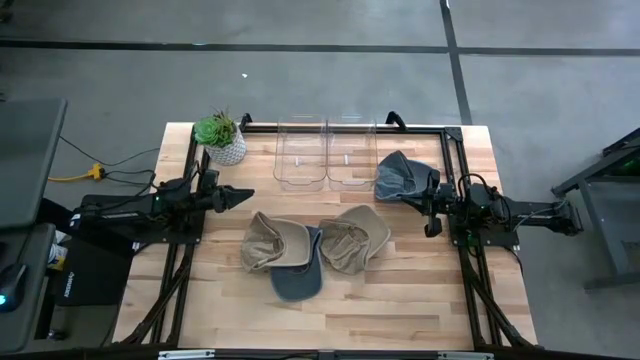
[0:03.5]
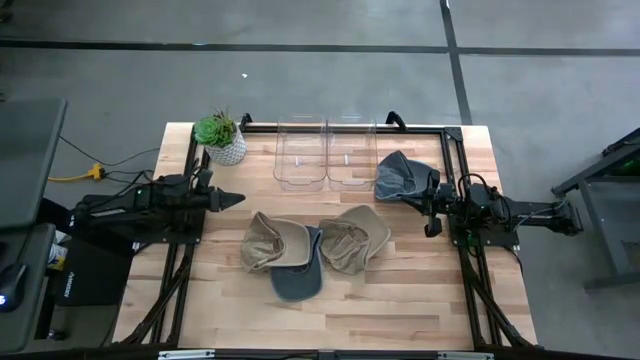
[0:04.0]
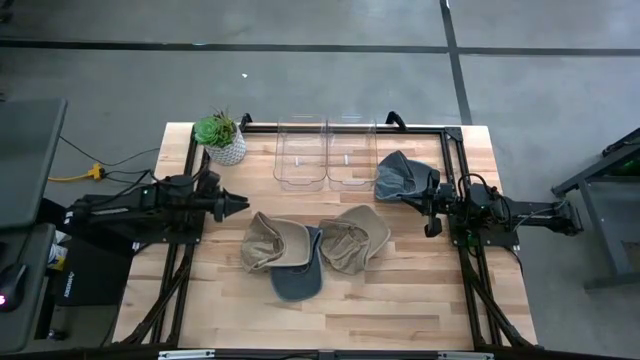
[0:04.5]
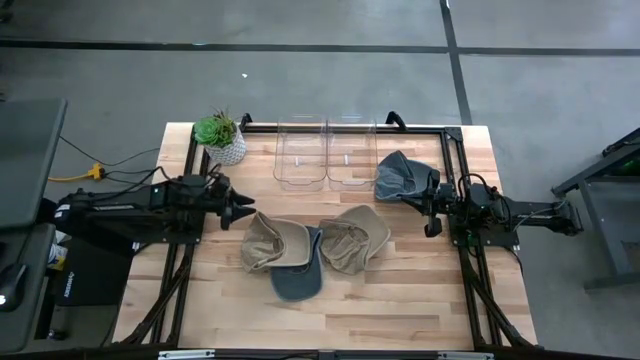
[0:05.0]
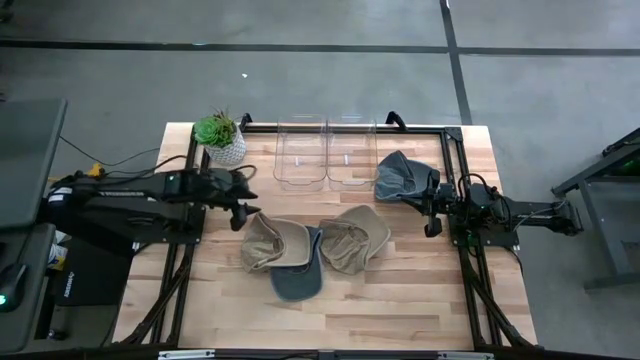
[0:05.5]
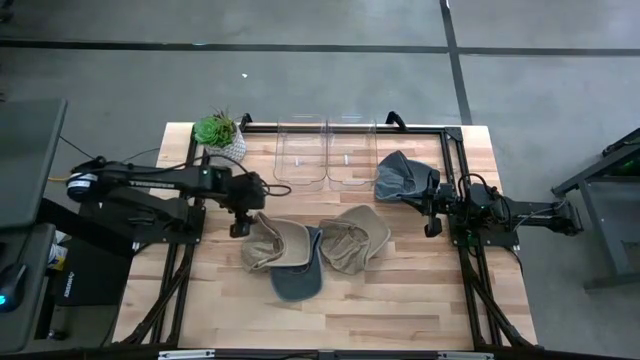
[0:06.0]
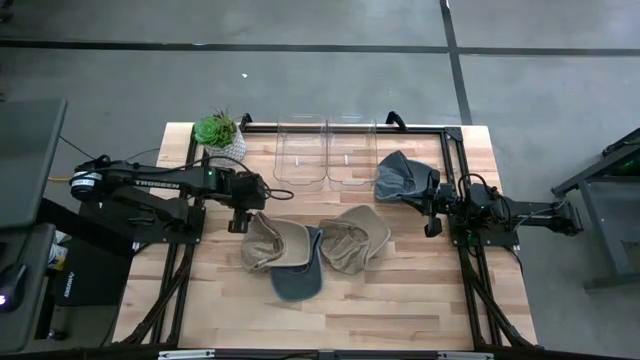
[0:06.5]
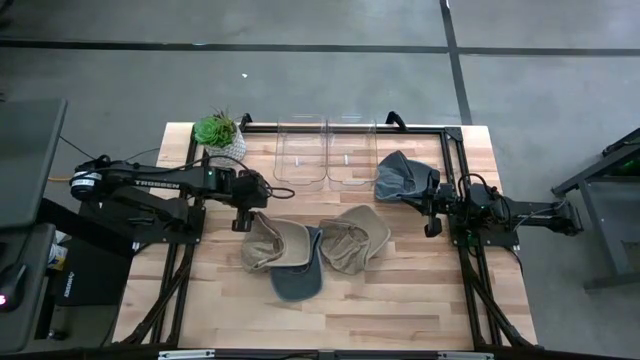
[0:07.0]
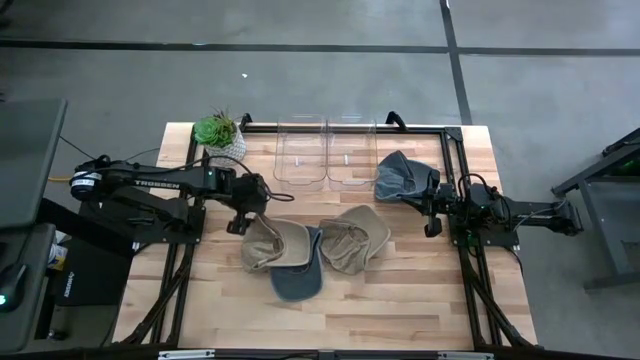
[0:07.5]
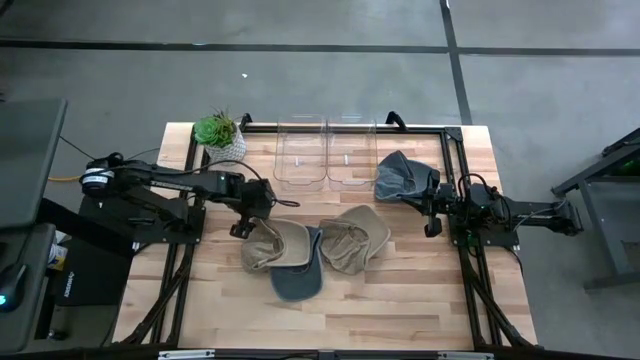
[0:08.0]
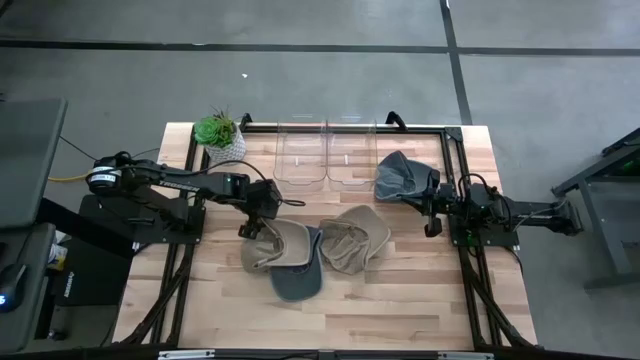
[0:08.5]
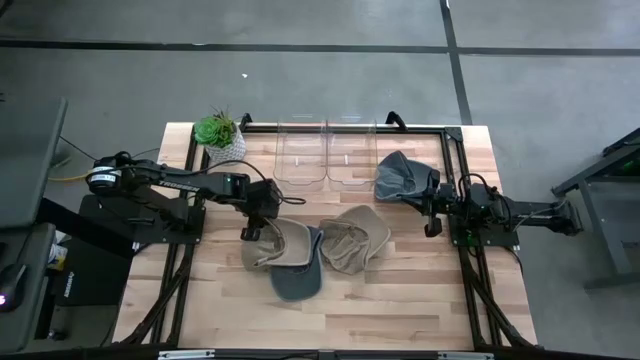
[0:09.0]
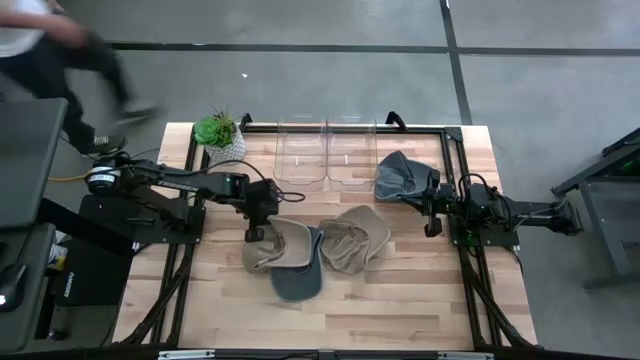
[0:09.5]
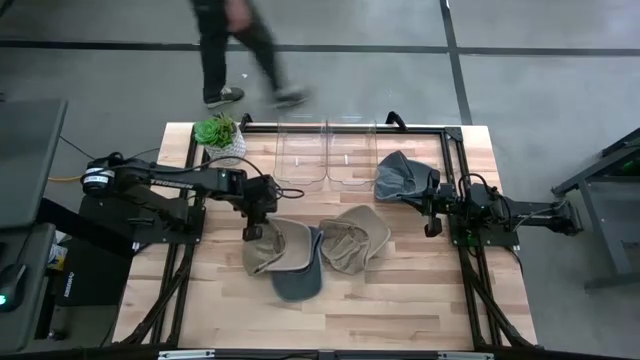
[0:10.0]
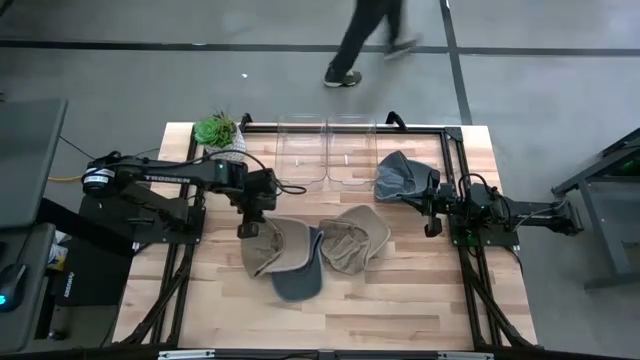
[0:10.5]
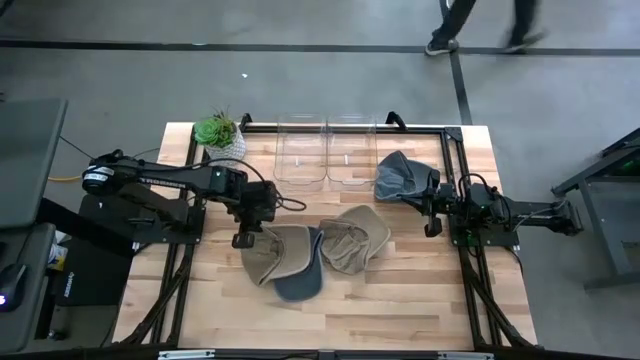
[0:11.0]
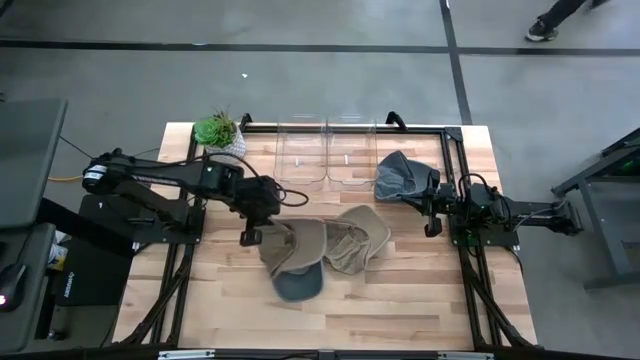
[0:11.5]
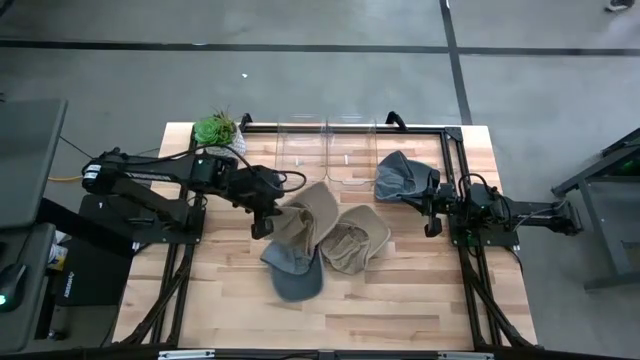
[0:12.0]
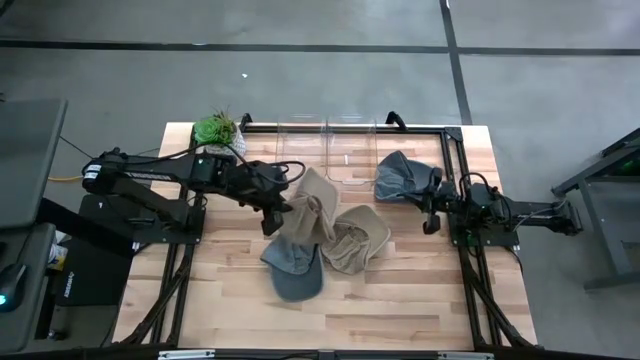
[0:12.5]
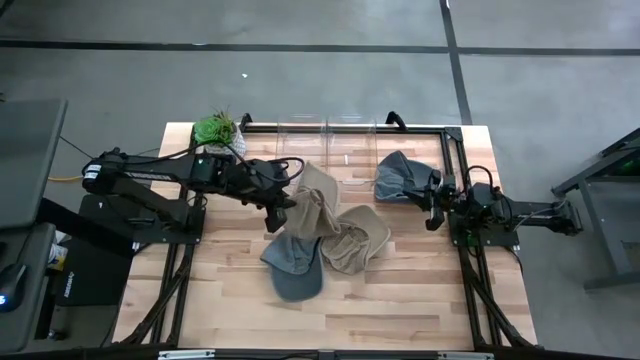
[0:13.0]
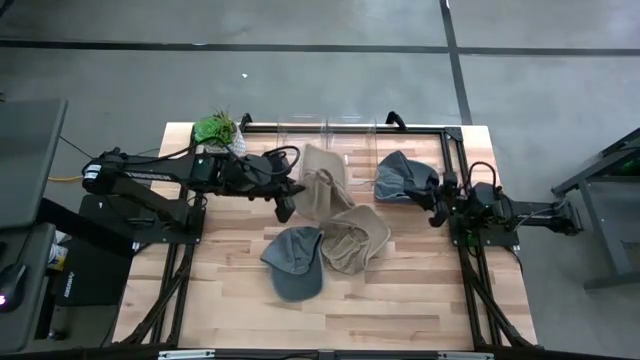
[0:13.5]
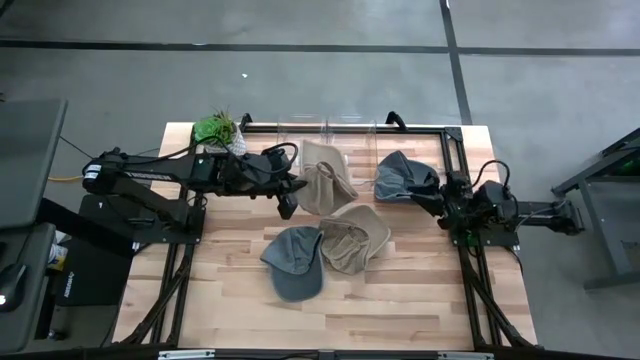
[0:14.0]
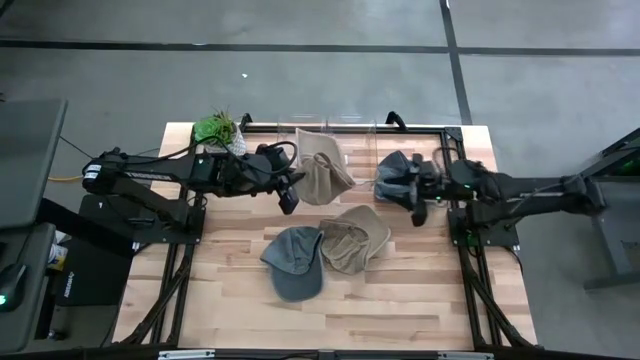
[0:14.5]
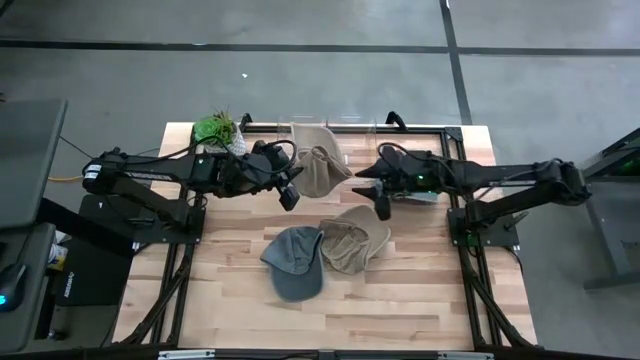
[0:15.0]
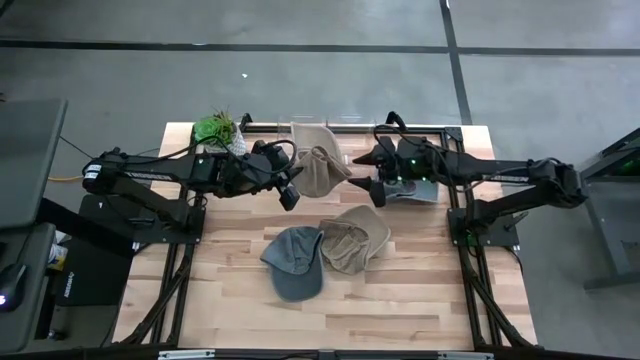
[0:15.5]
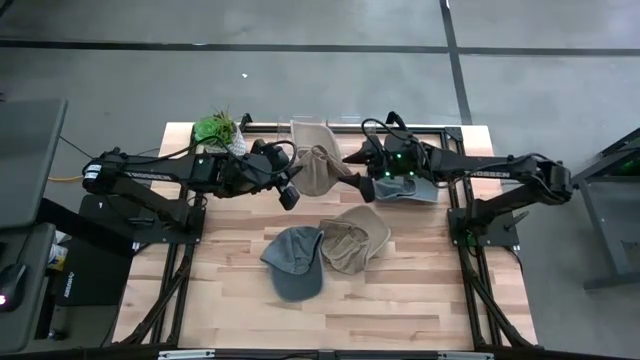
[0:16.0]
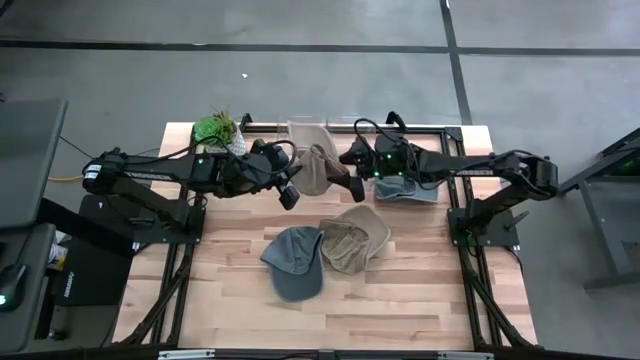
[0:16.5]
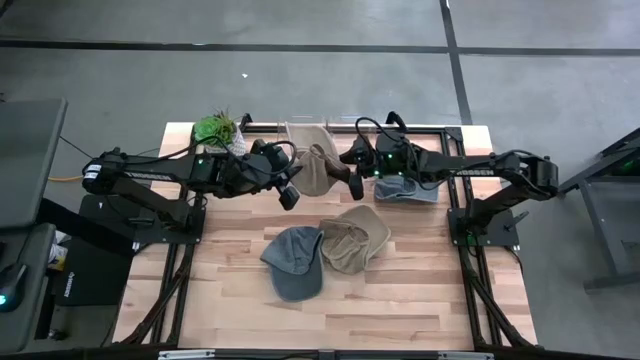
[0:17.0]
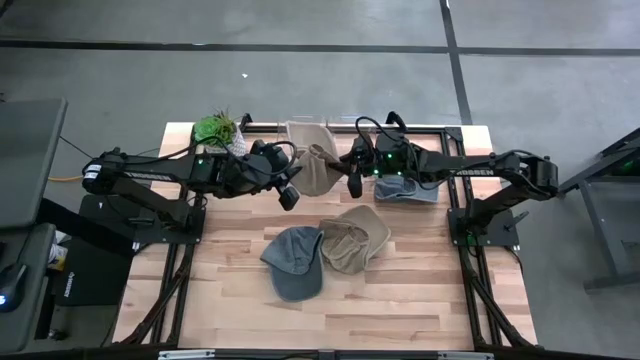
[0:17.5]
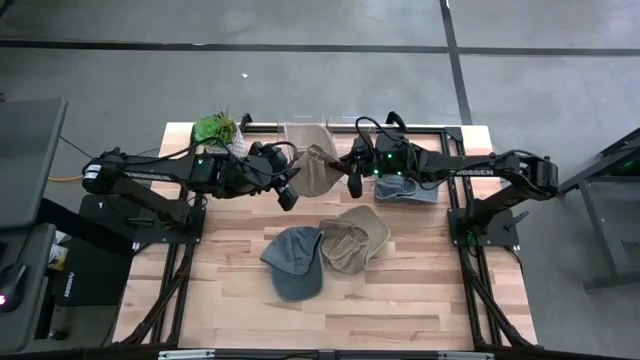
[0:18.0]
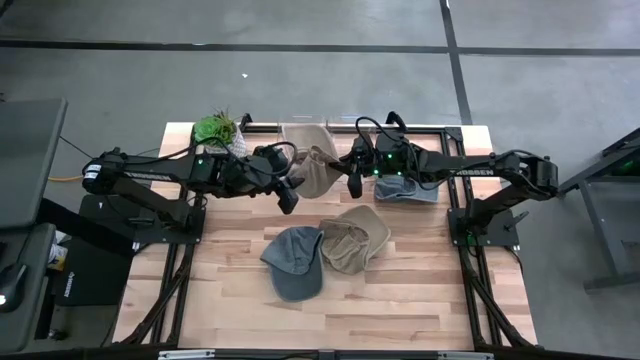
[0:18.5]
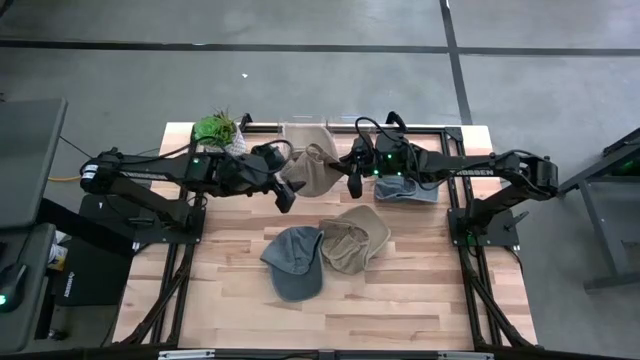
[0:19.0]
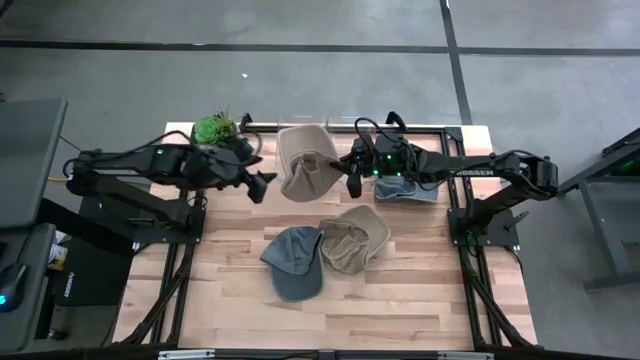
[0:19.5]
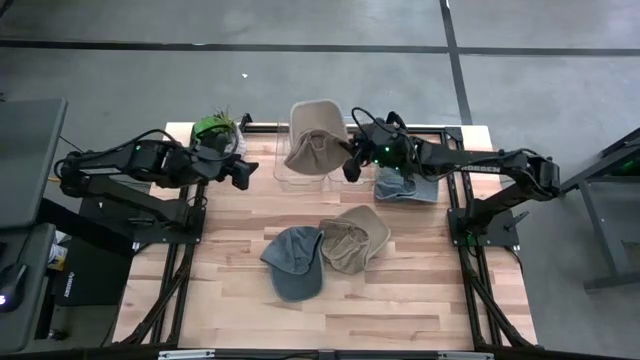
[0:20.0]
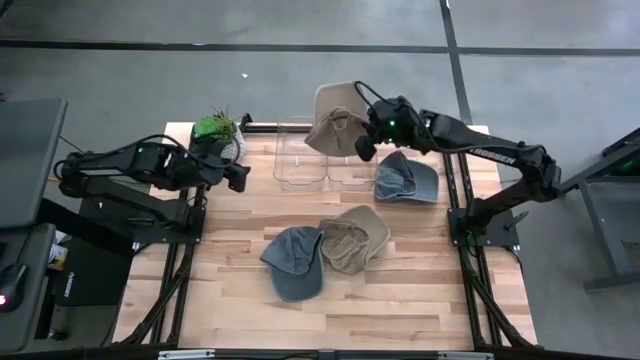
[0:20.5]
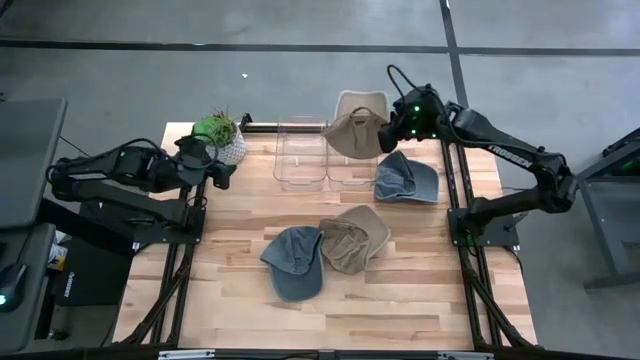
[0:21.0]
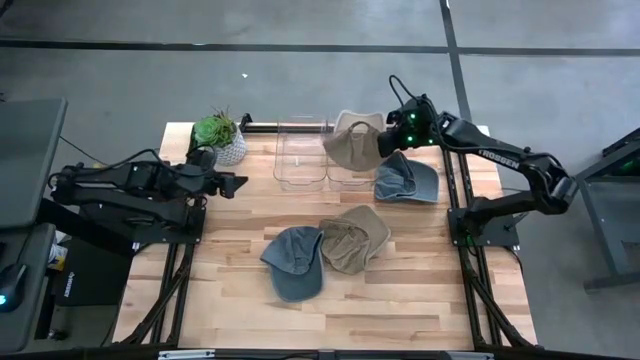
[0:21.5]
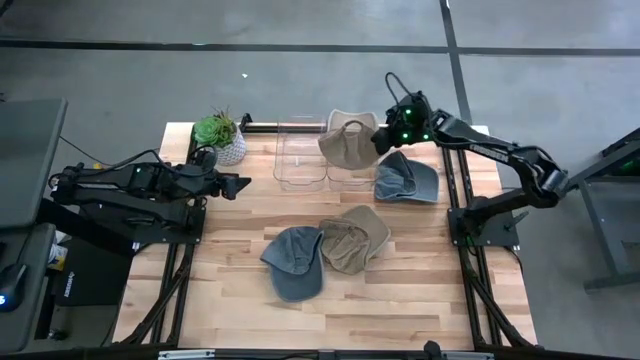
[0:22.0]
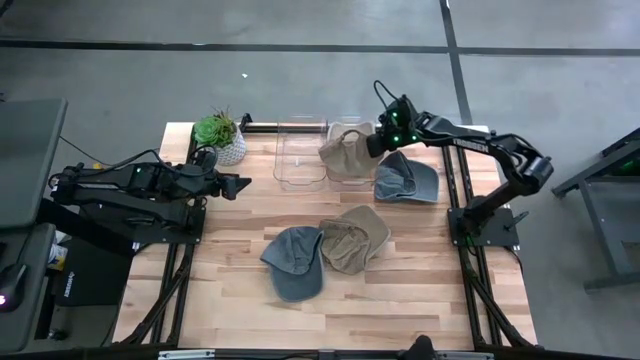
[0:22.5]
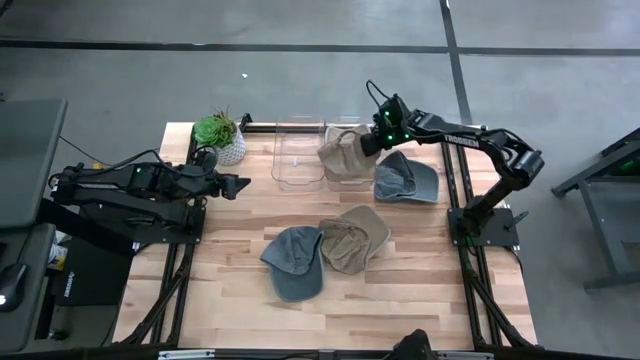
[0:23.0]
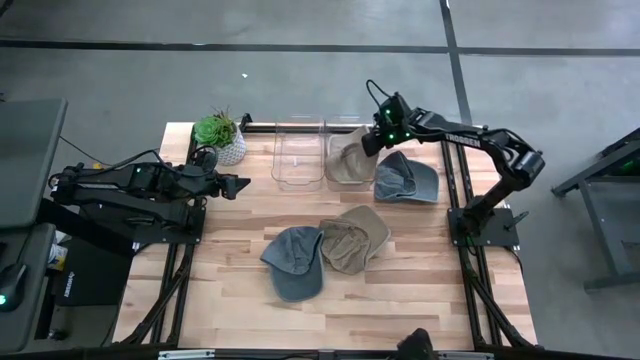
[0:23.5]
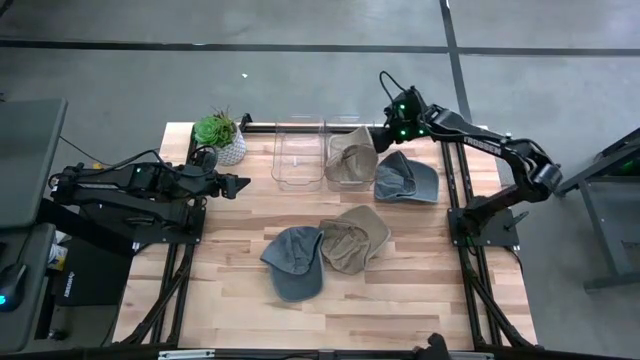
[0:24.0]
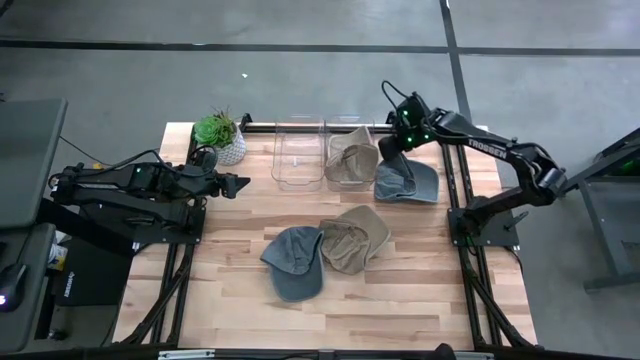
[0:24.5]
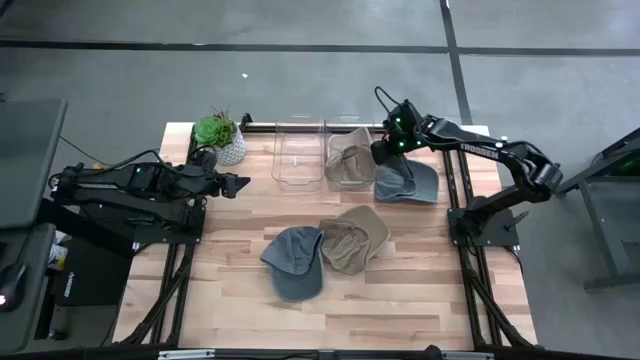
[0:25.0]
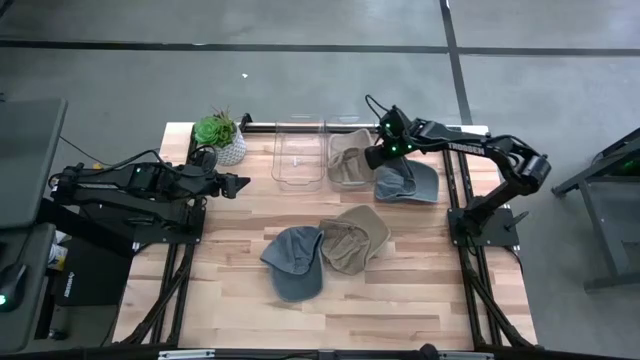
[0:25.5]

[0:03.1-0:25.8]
Task: Pick & Place hat
Put the left brown cap into the right transparent bin
